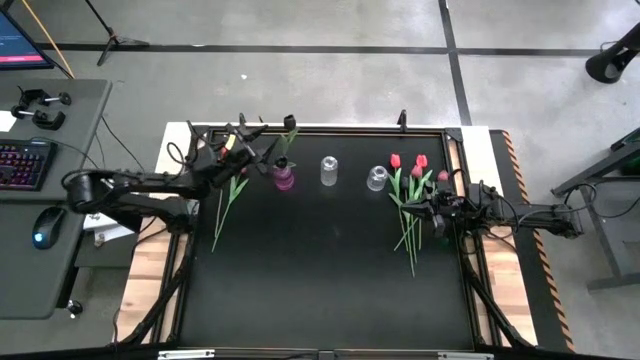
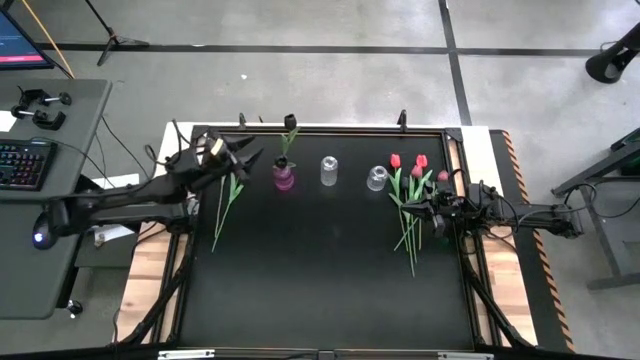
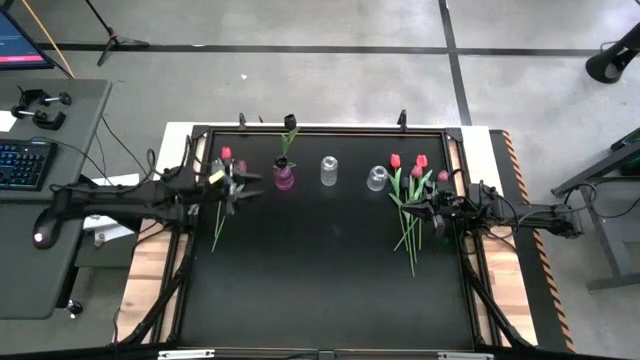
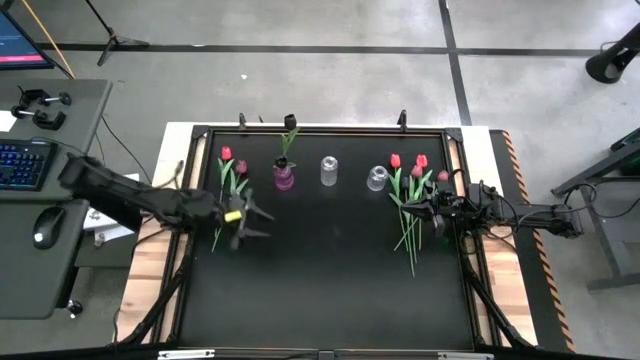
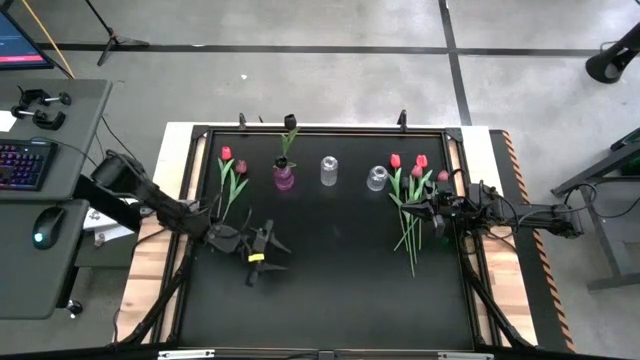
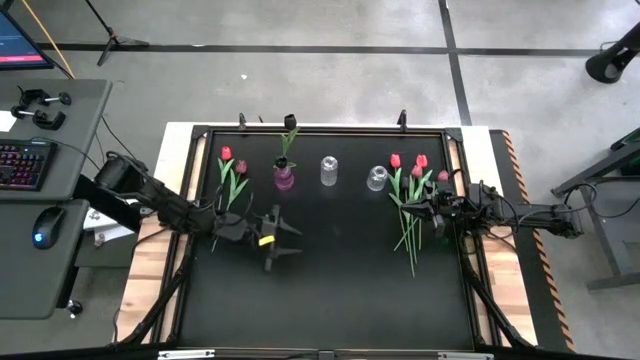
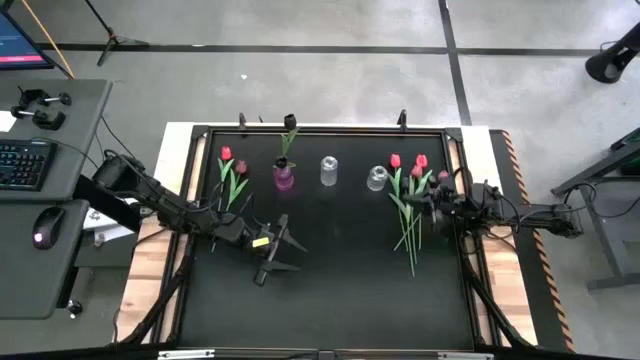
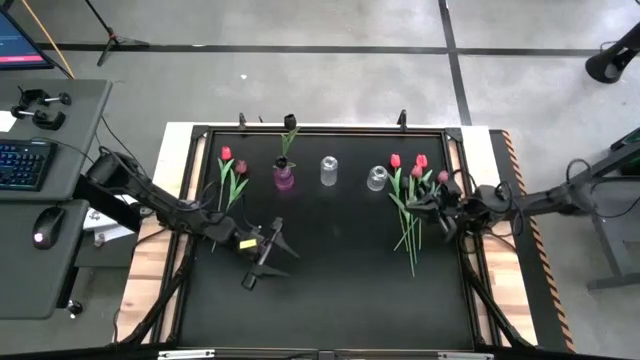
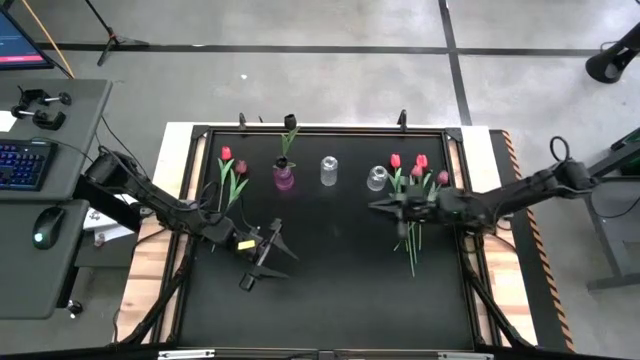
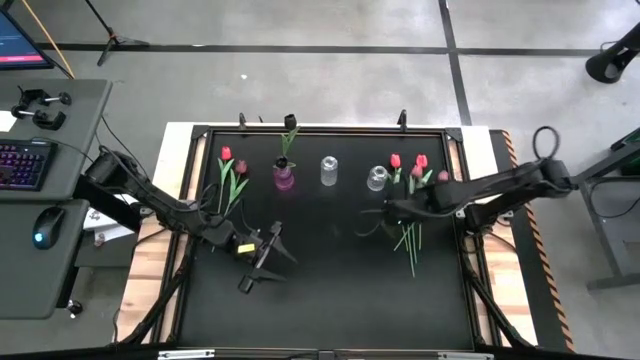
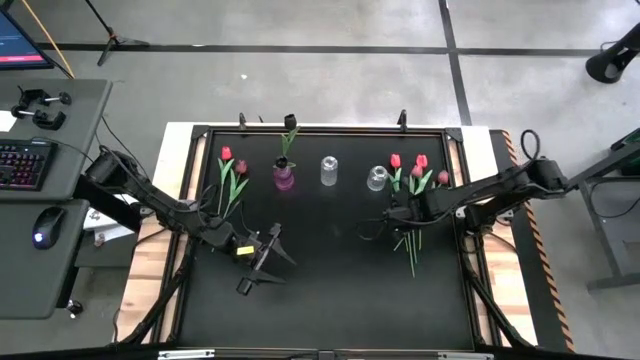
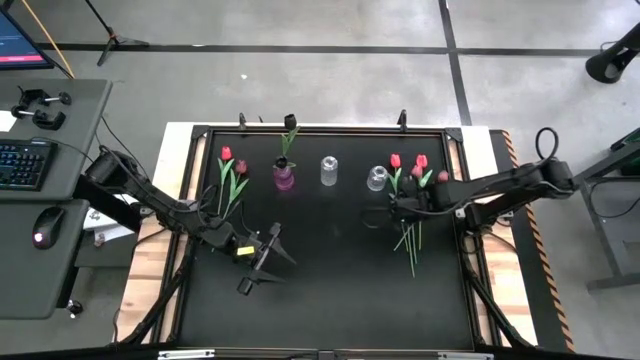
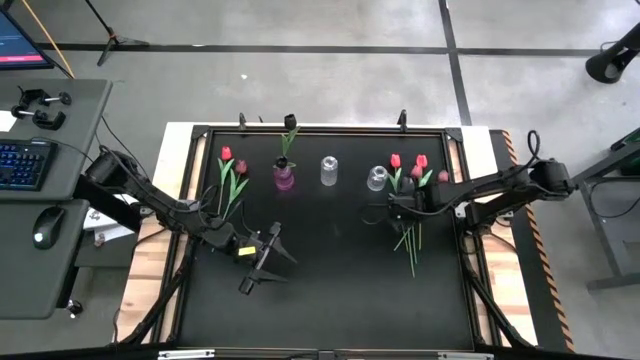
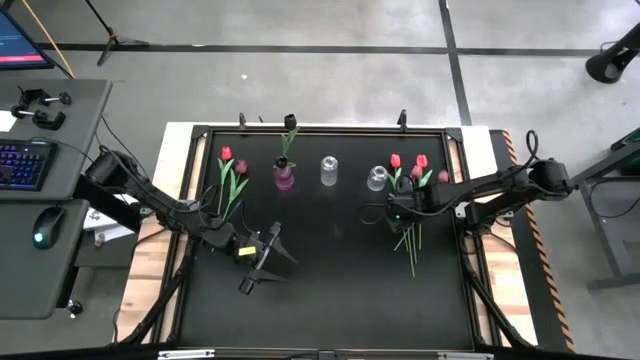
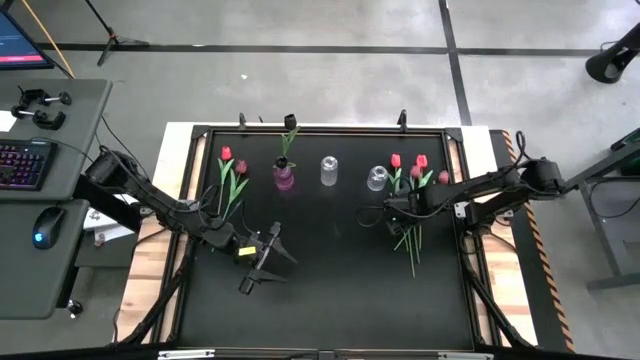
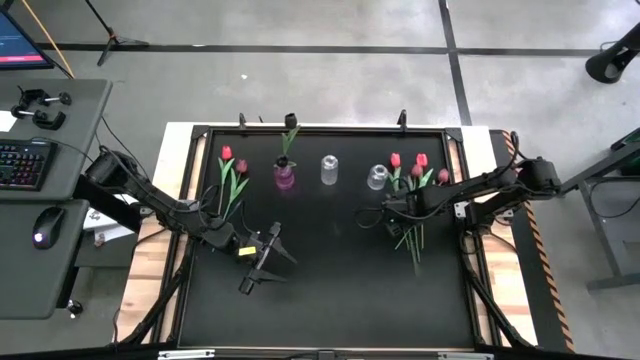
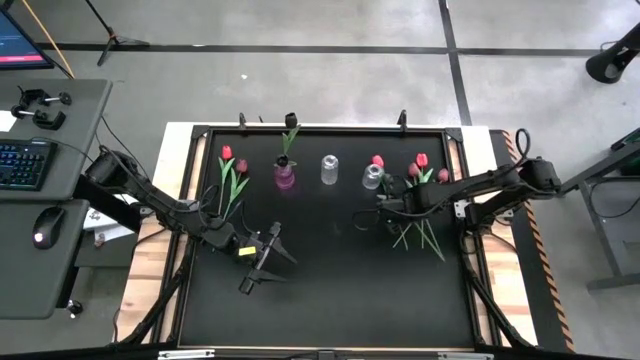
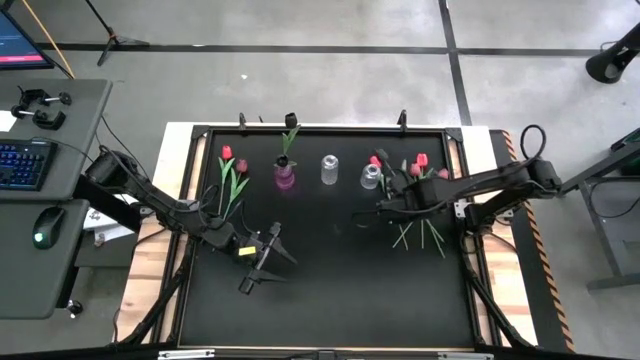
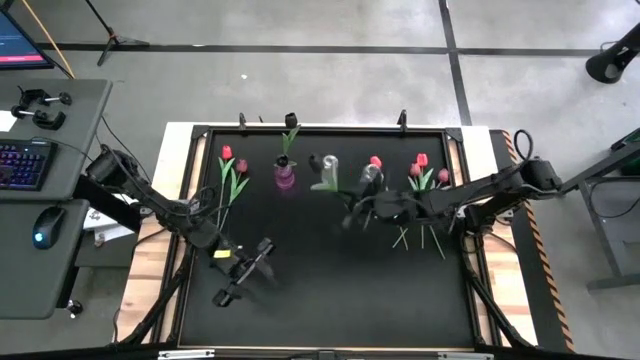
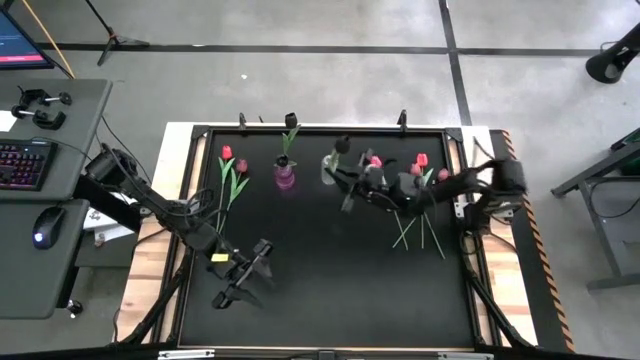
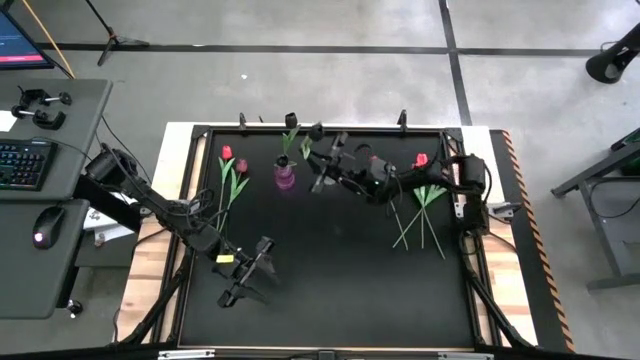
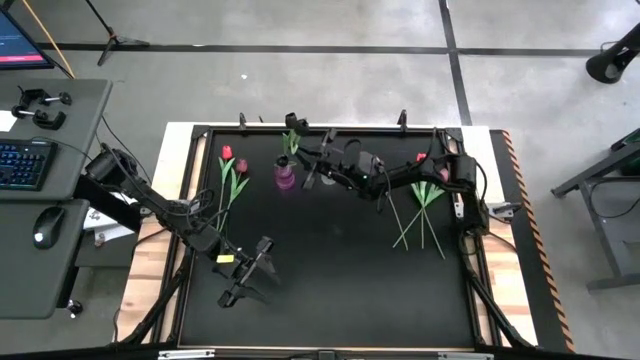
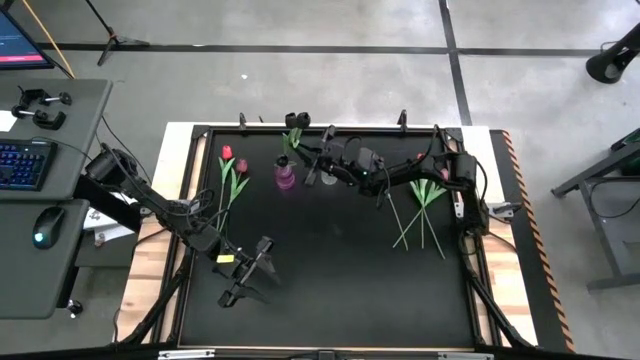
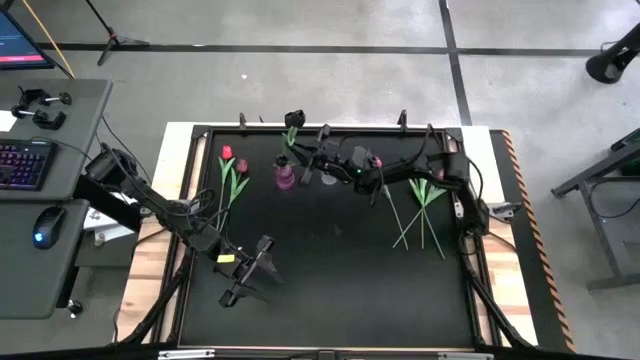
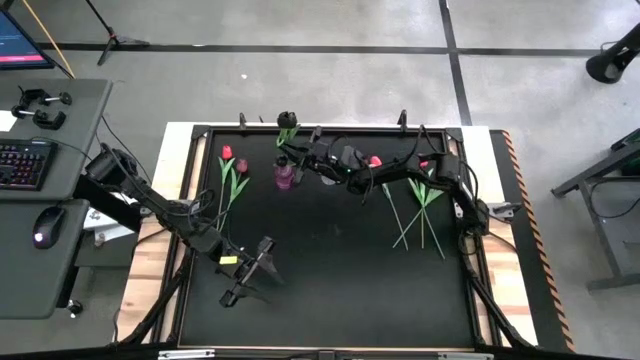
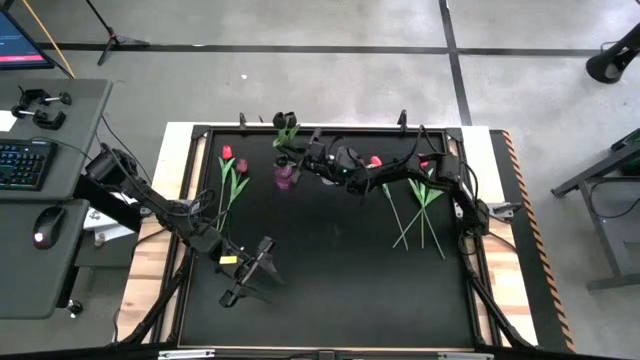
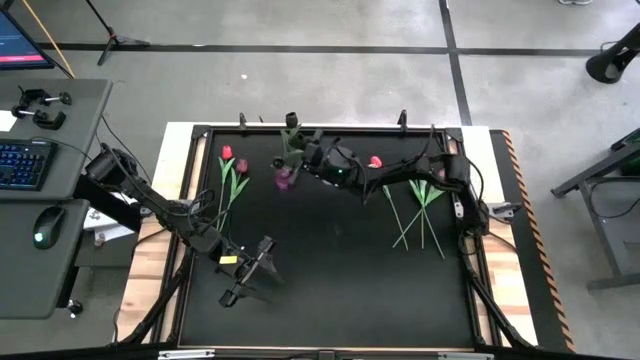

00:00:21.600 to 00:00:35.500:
Task: Sort flowers into vase by color
Put the black tulip into the violet vase

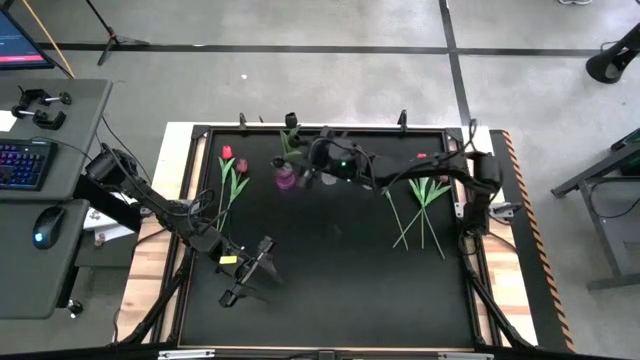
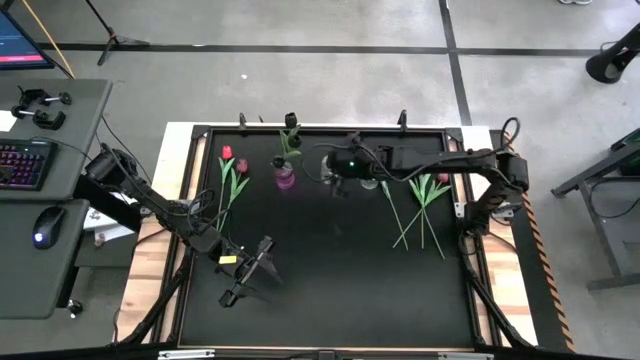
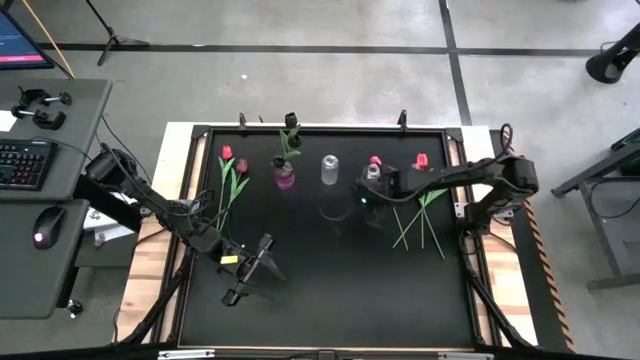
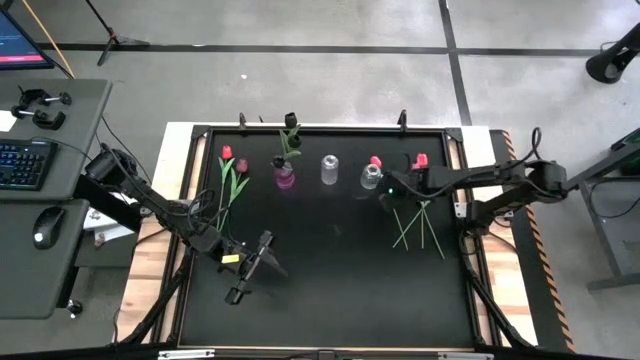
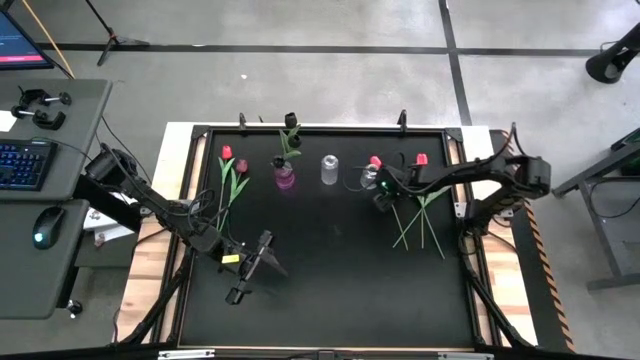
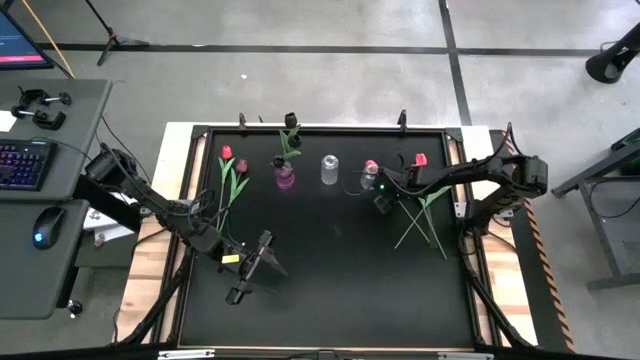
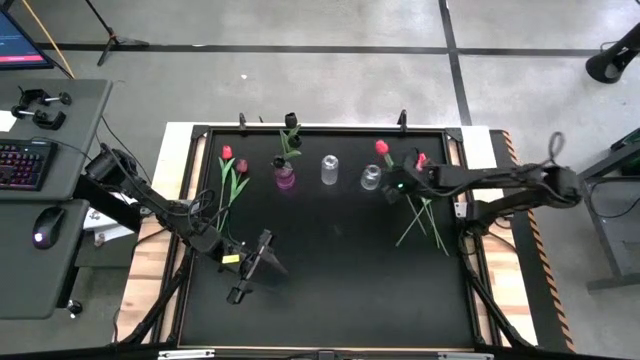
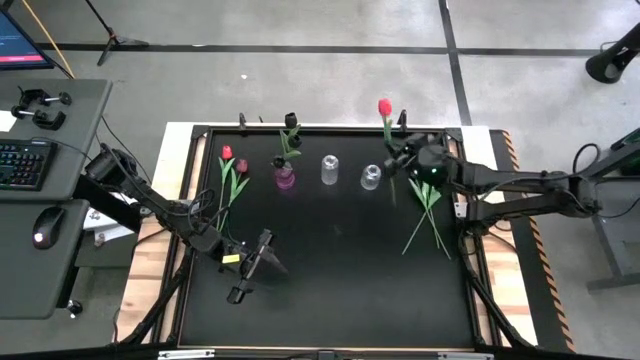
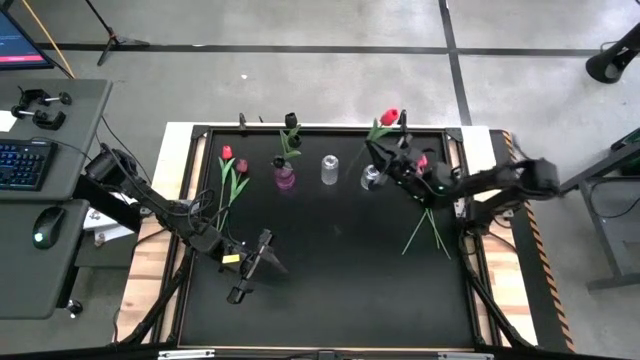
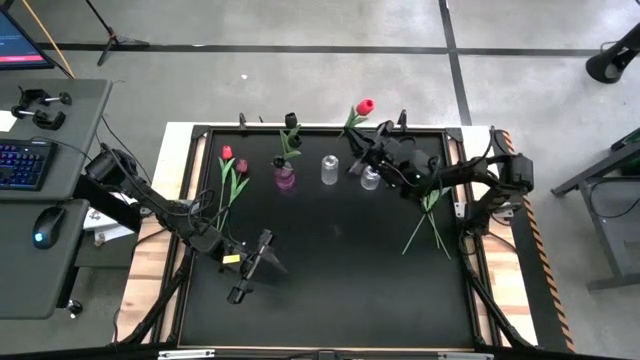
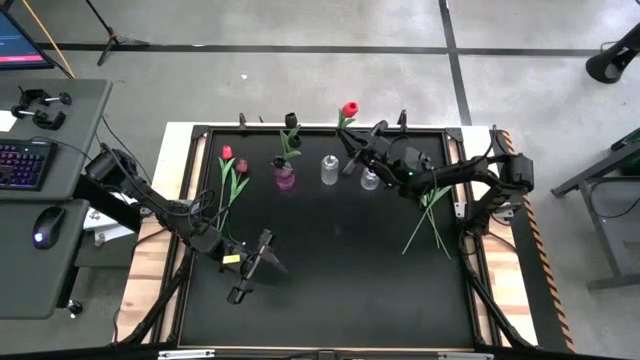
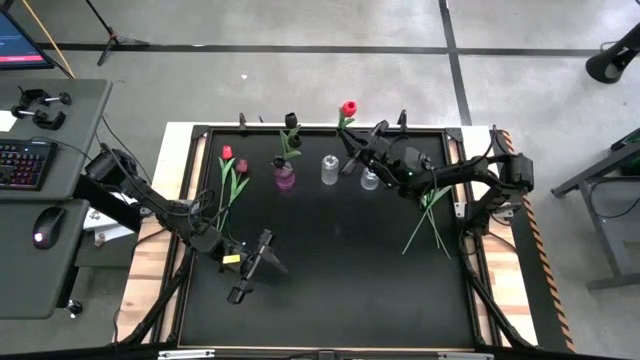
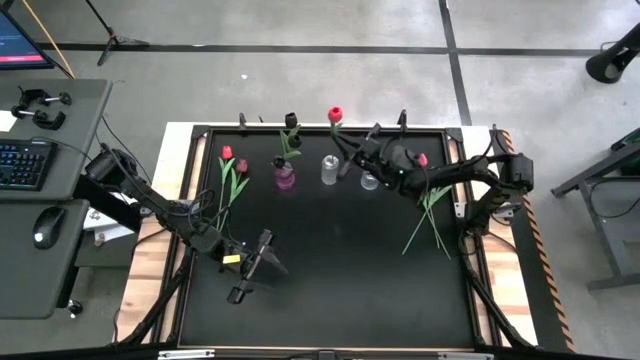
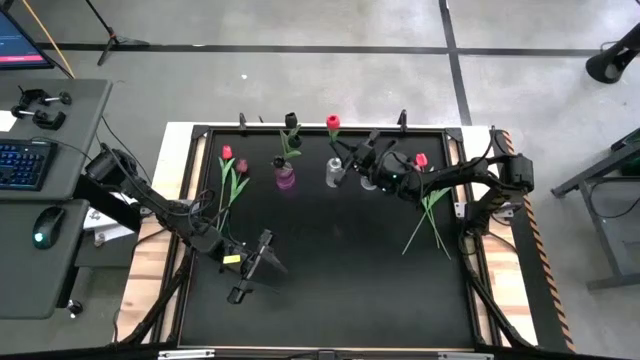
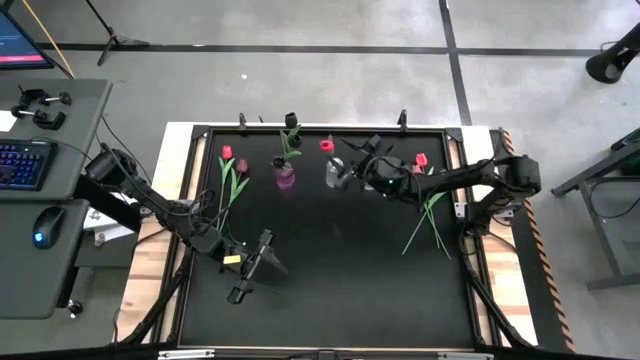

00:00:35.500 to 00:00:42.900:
Put the center pink tulip into the left transparent vase
